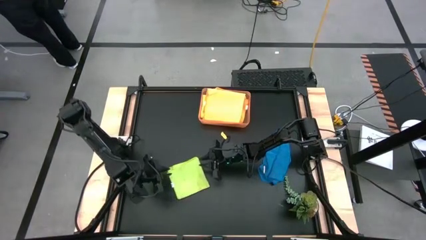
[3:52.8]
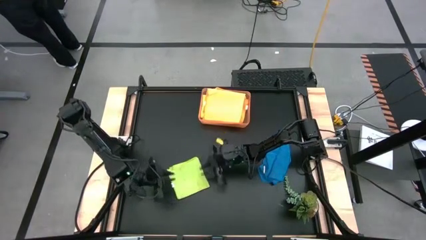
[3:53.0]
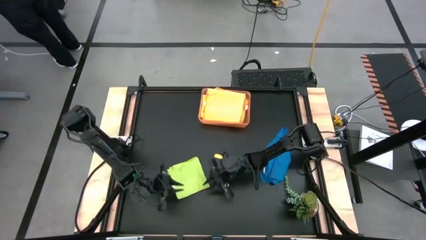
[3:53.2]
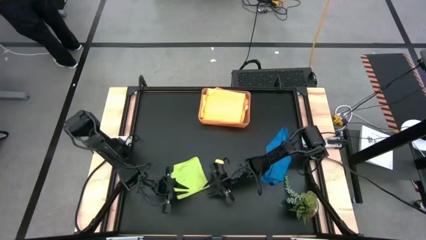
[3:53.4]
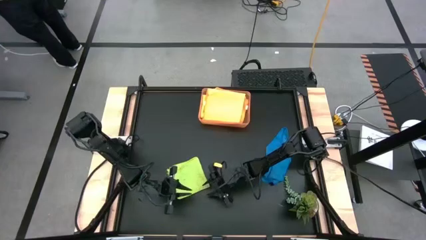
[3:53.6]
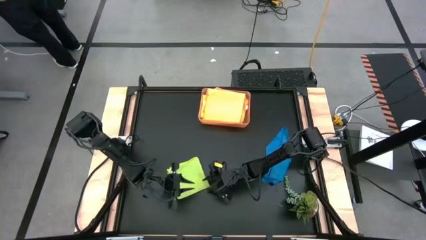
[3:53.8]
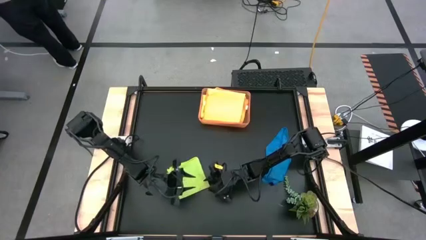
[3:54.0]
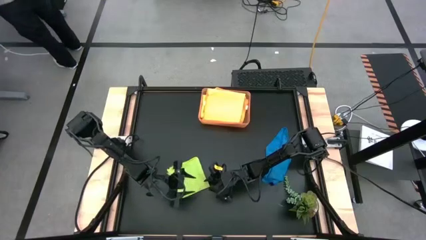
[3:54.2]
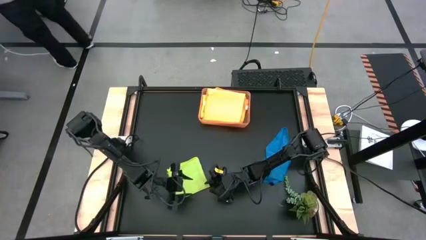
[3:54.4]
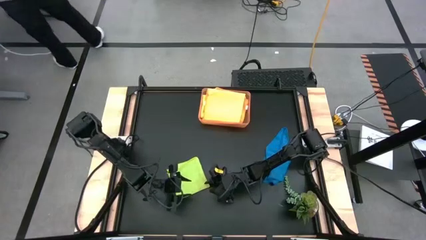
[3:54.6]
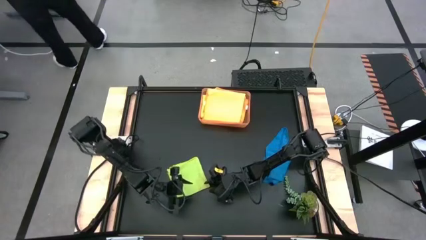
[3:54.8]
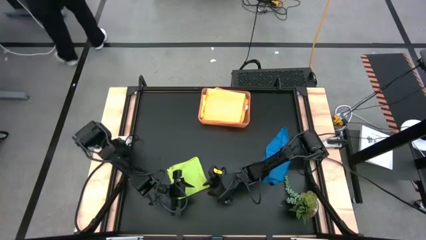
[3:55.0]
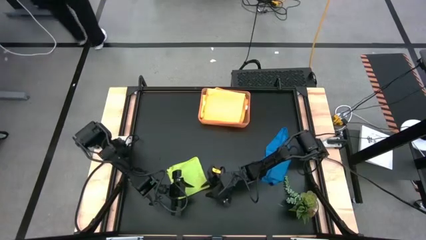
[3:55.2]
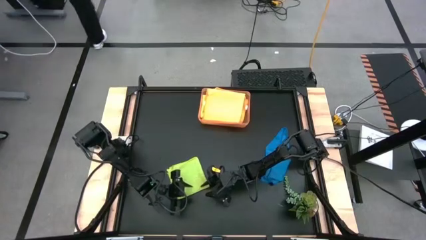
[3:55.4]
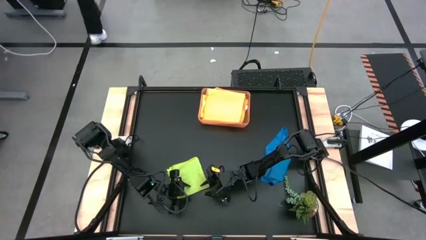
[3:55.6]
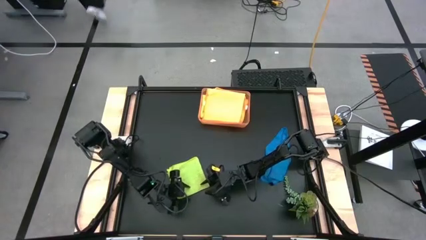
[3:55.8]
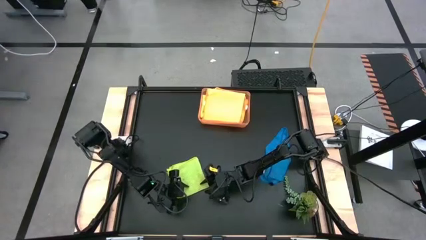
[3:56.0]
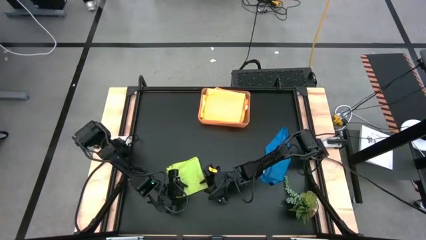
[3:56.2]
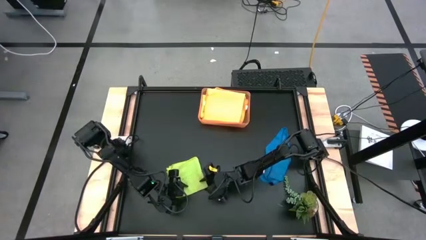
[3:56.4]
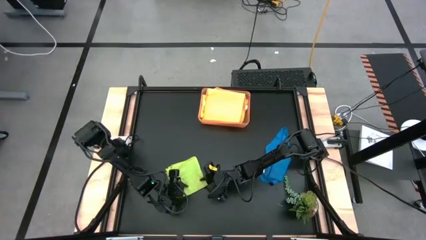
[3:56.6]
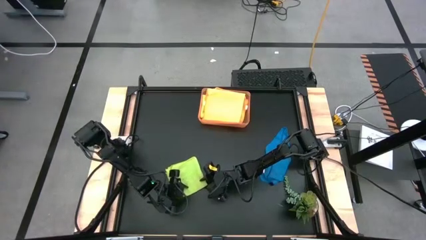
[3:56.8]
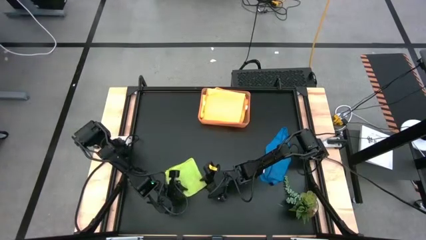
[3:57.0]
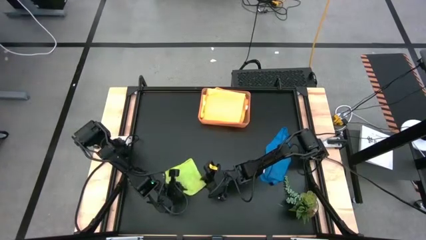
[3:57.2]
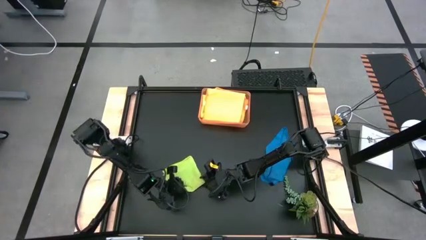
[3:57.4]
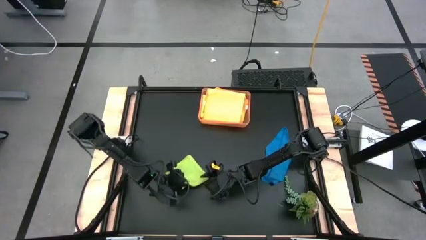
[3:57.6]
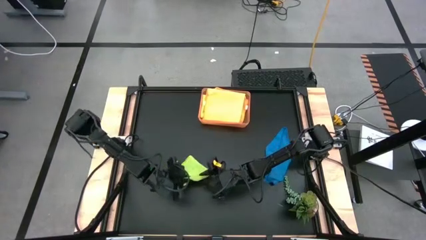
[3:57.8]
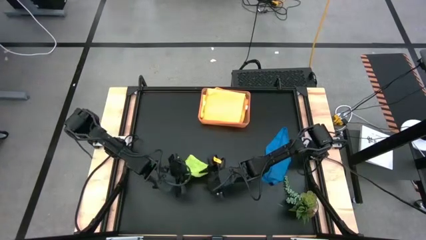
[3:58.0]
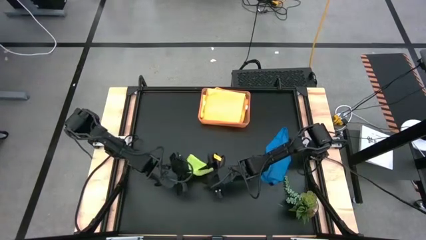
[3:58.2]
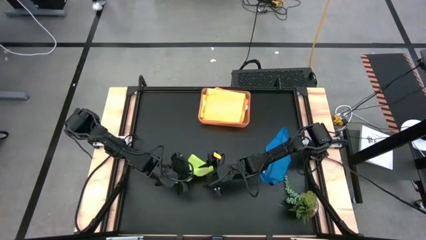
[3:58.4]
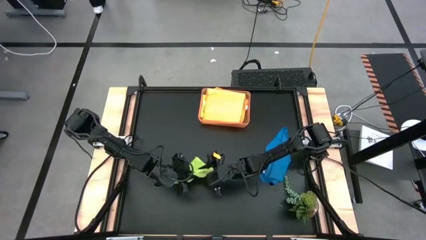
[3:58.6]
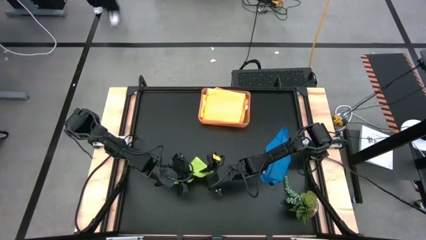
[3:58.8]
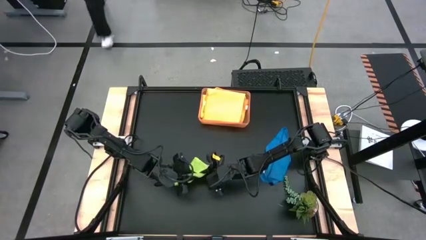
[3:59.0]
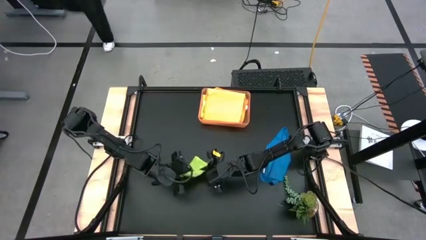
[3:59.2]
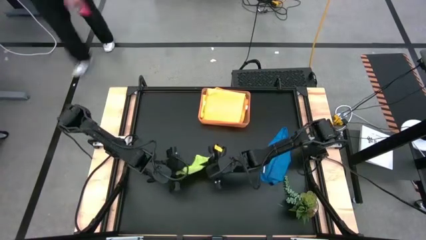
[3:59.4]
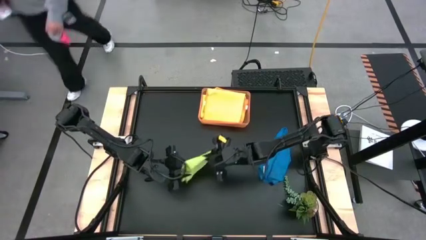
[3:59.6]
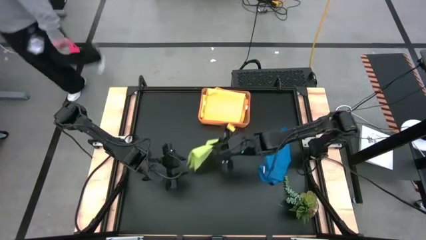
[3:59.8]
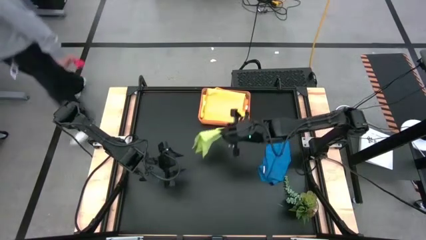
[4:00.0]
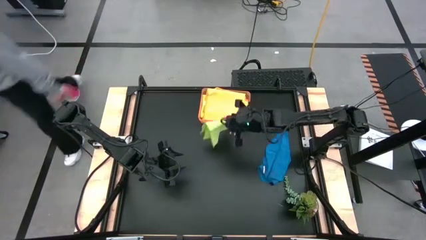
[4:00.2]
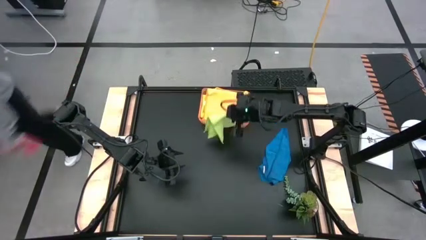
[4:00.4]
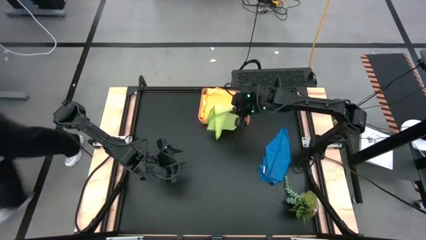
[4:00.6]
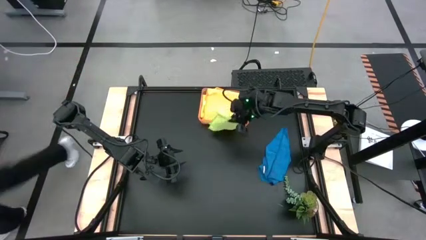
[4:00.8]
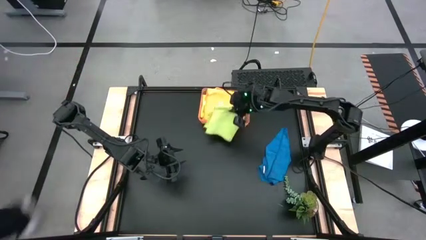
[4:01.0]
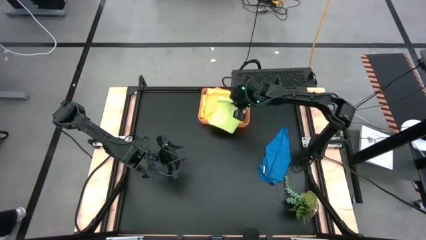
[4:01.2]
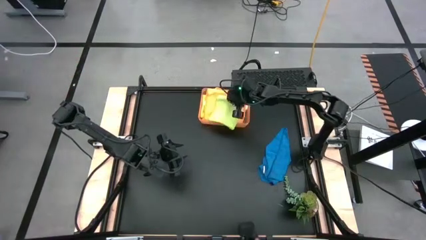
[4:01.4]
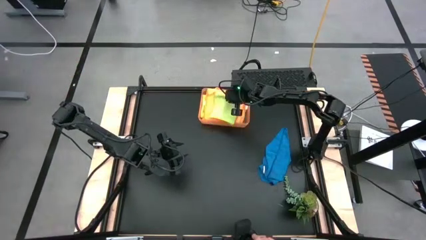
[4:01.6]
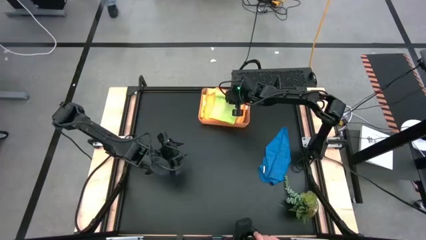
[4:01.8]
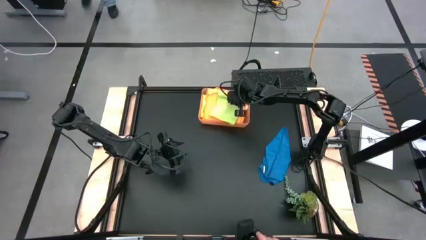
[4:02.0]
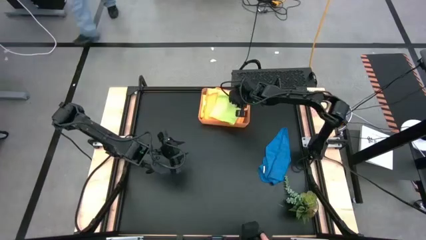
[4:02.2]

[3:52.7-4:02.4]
Task: Fold microfiber towels
Put the green towel in the orange bin

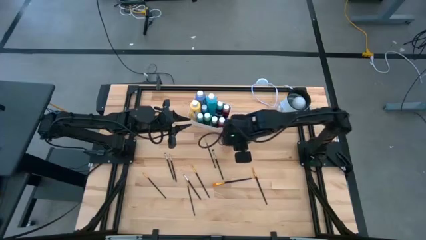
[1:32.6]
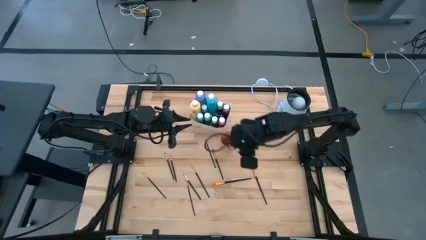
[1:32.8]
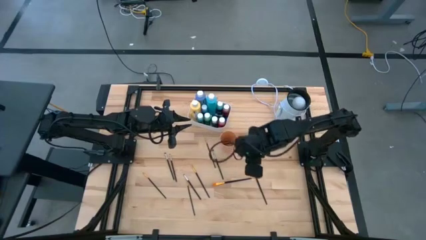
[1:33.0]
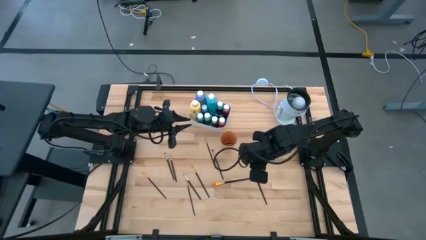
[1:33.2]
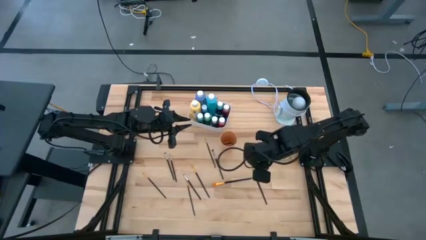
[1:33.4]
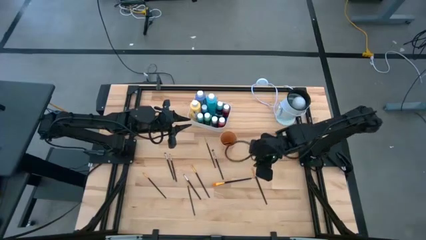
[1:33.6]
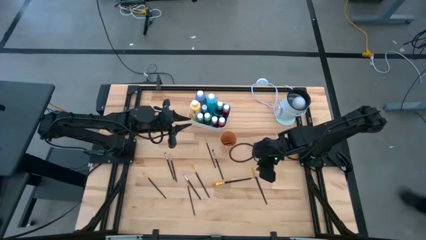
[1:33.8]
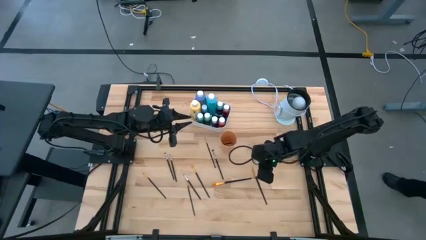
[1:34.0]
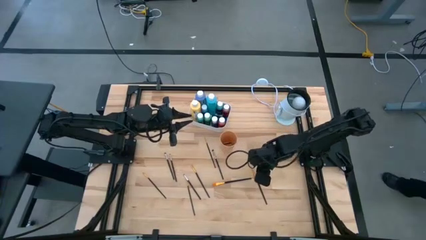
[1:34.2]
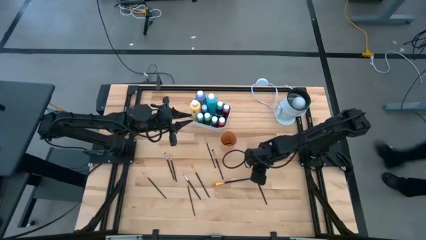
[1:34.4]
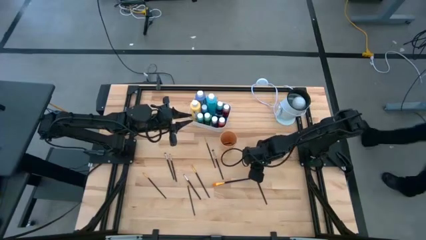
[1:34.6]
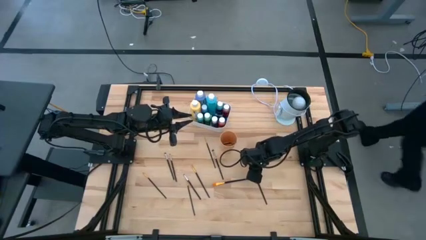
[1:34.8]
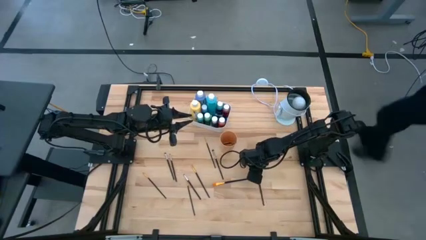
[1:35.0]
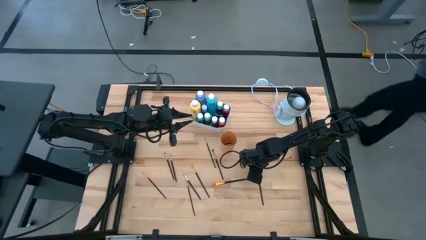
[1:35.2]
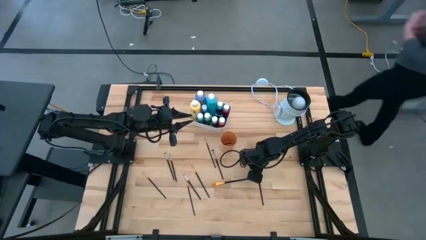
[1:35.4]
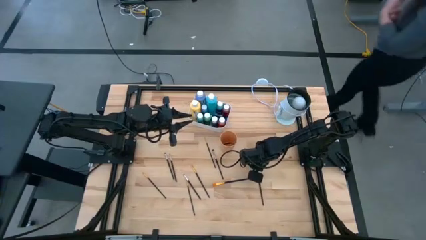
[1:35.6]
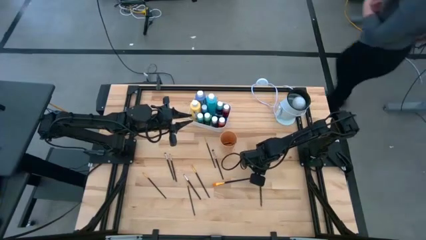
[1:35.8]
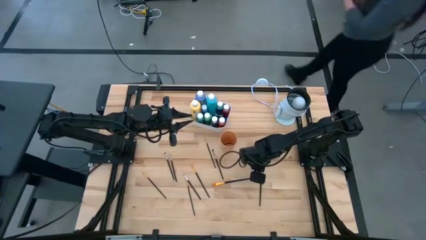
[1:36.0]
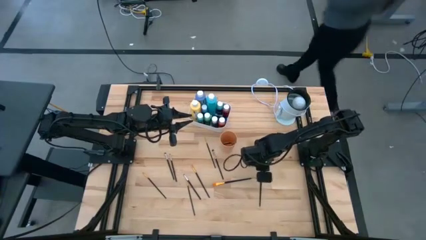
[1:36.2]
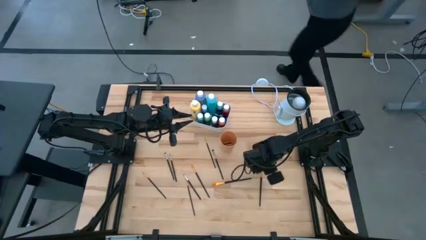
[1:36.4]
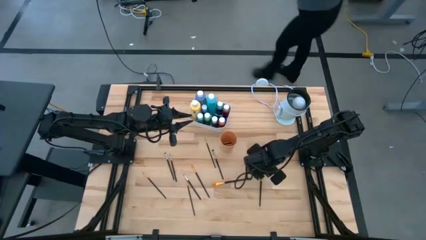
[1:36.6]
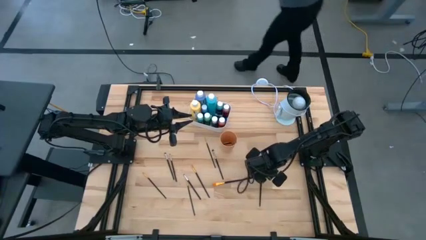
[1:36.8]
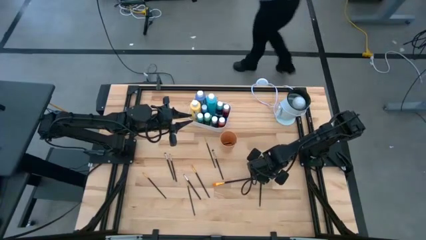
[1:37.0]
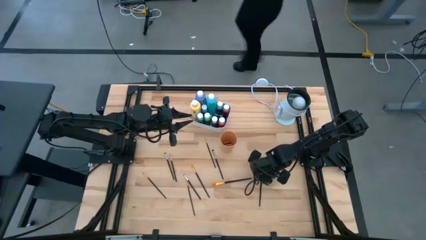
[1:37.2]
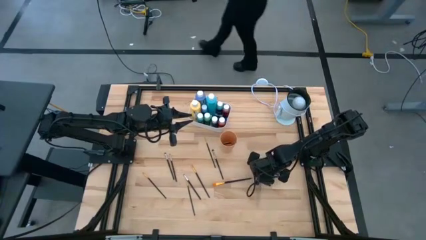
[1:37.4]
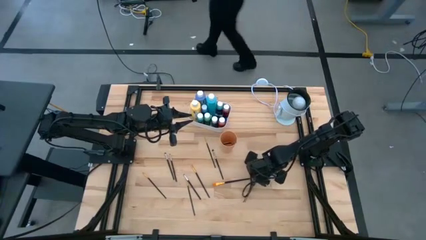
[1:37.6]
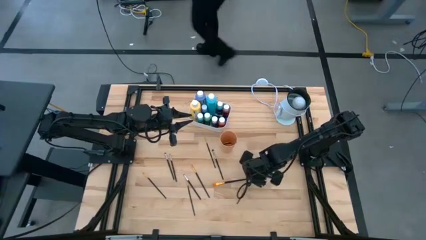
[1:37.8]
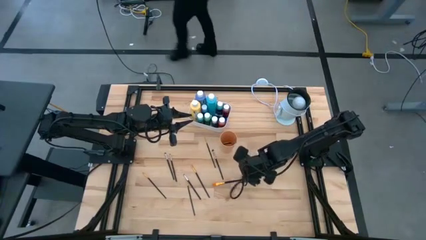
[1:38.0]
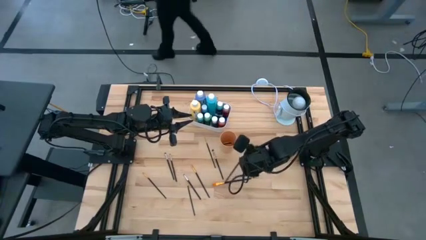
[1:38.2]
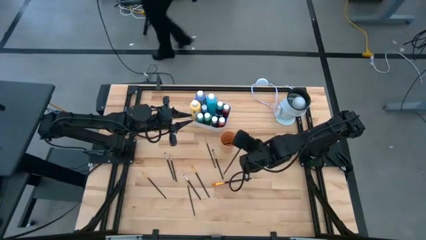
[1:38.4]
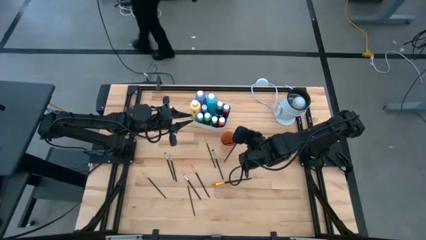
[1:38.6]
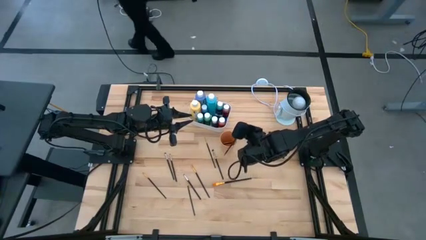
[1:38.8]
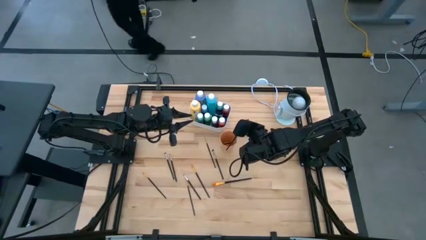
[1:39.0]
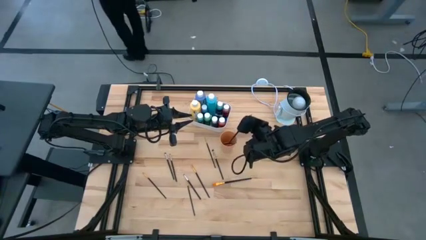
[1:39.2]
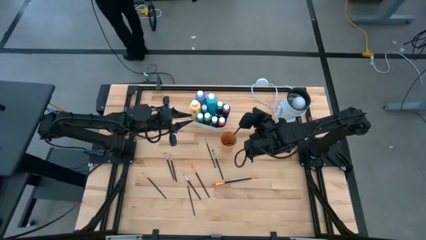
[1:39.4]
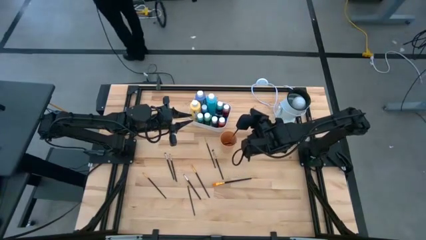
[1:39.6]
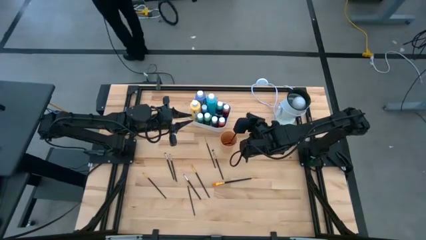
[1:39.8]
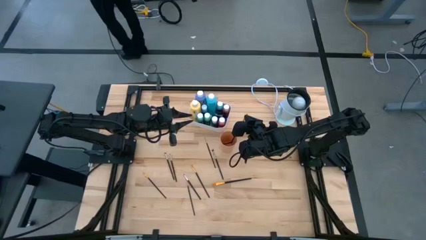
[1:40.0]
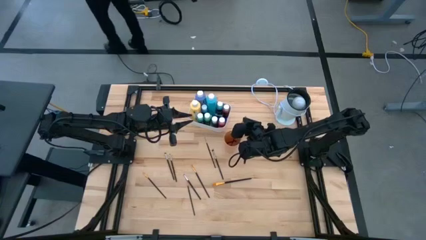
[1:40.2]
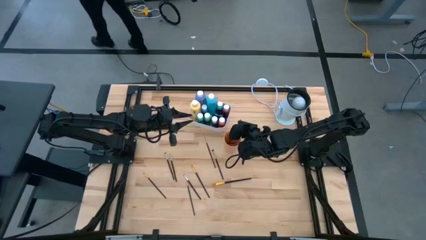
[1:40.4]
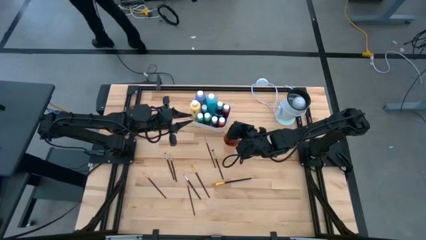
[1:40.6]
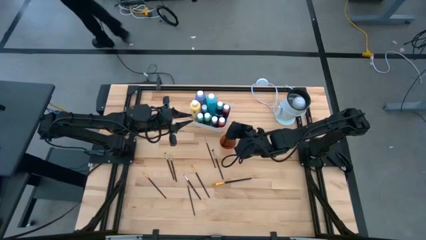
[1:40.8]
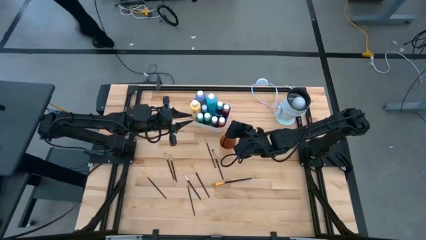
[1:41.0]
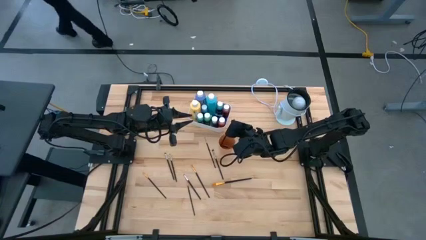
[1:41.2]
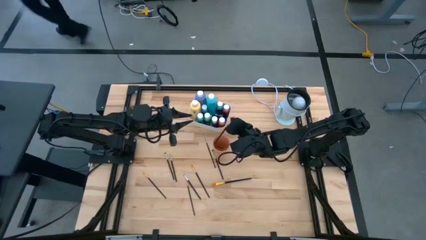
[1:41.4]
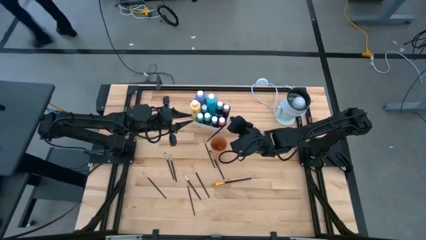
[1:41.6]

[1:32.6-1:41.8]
Task: Pick & Place Paint Supplies
Put the black paint brush into the orange cup
